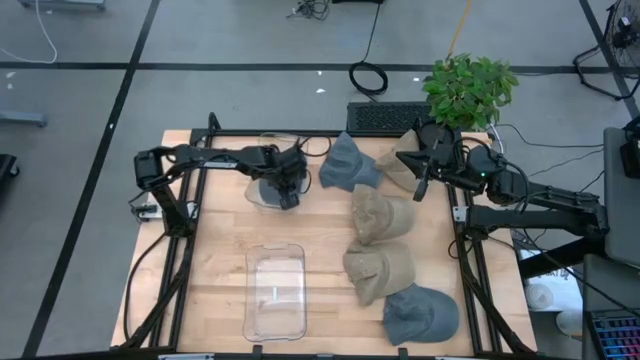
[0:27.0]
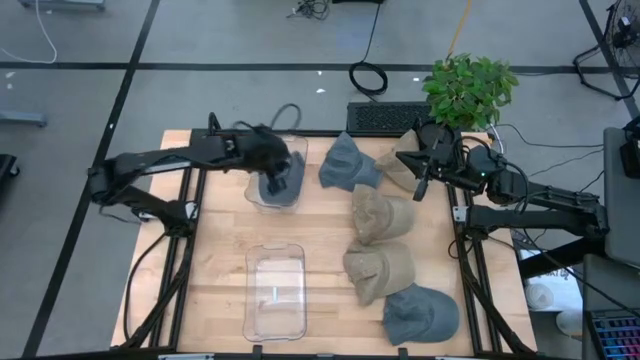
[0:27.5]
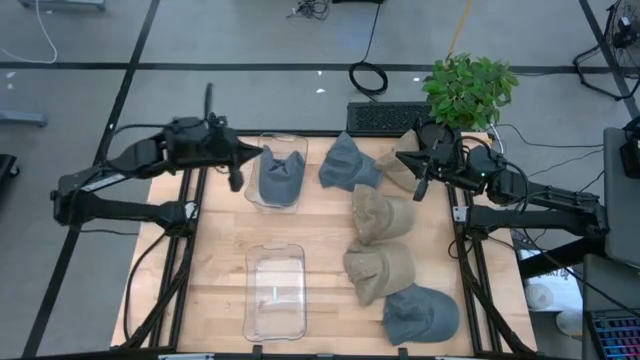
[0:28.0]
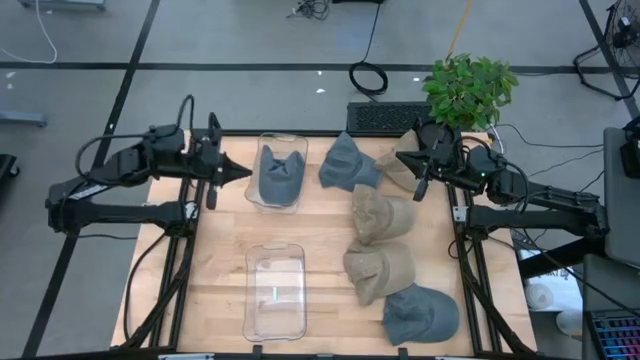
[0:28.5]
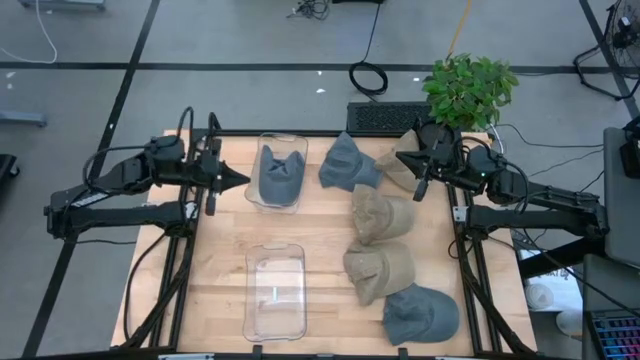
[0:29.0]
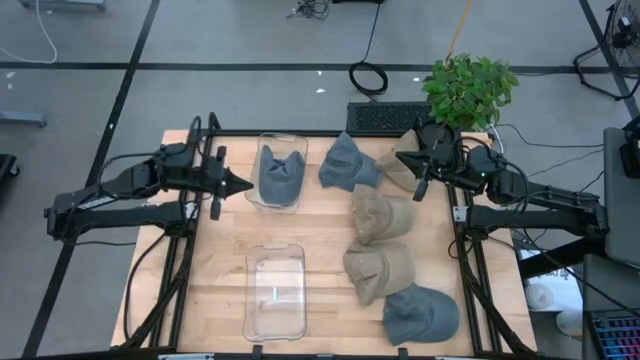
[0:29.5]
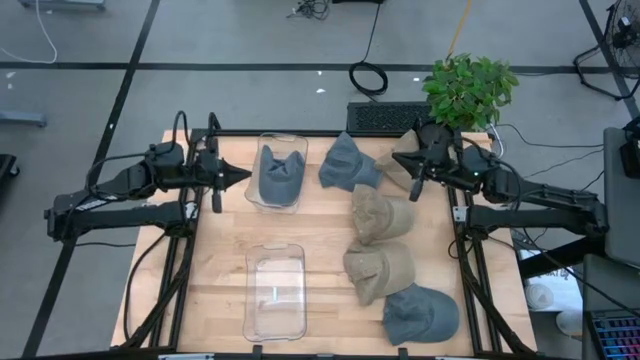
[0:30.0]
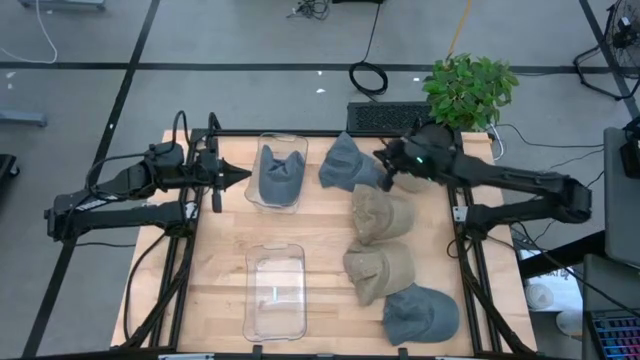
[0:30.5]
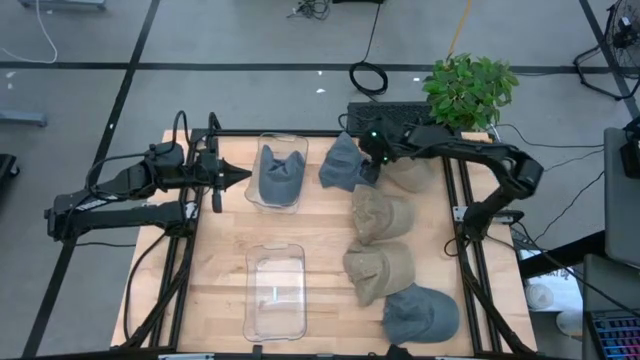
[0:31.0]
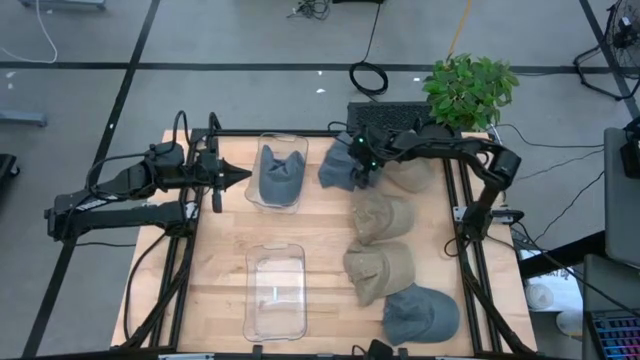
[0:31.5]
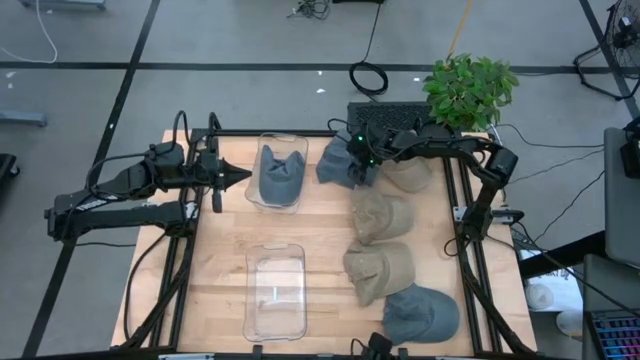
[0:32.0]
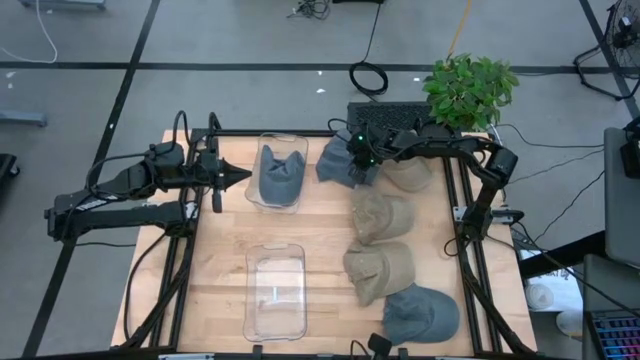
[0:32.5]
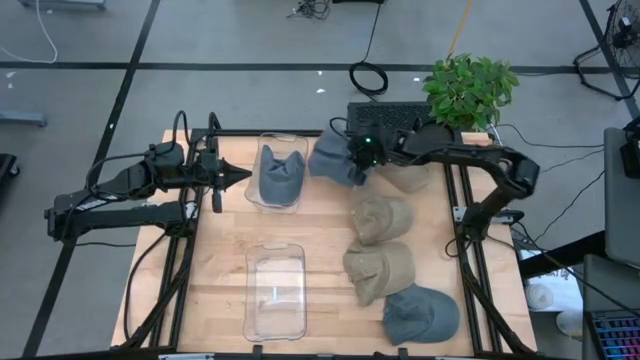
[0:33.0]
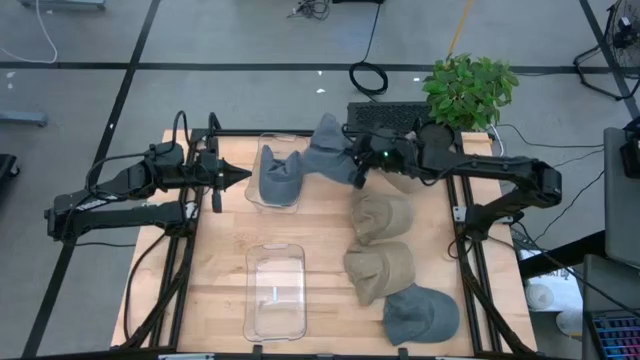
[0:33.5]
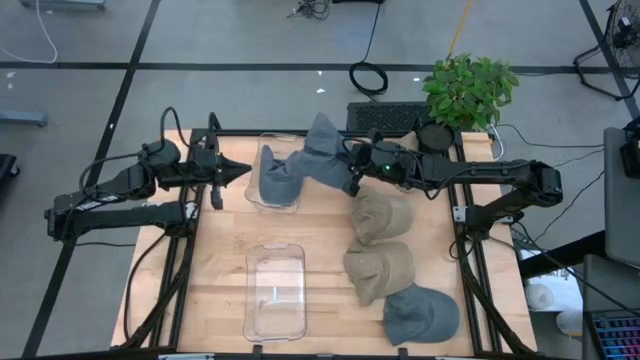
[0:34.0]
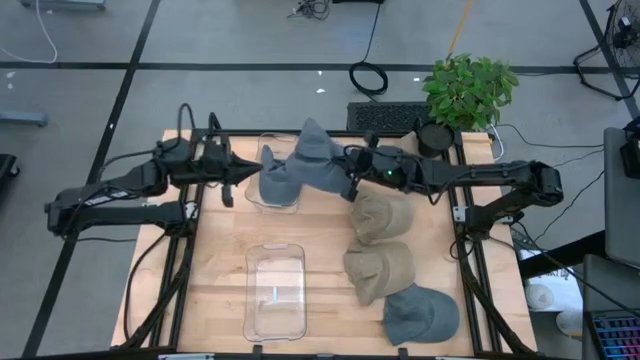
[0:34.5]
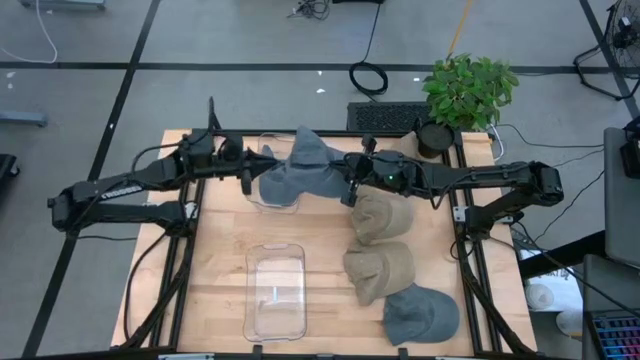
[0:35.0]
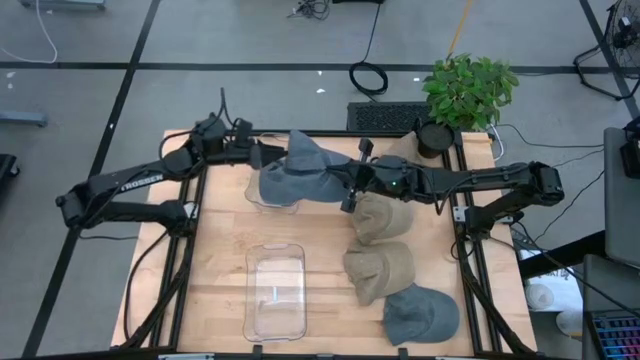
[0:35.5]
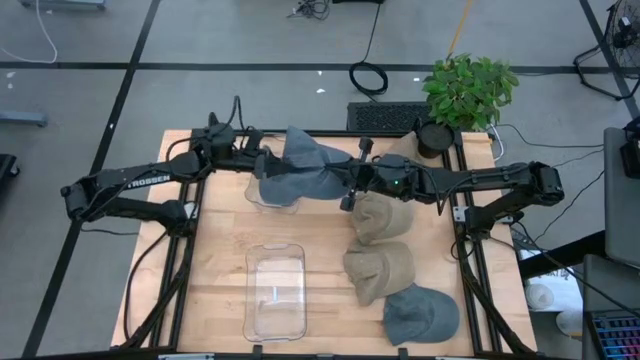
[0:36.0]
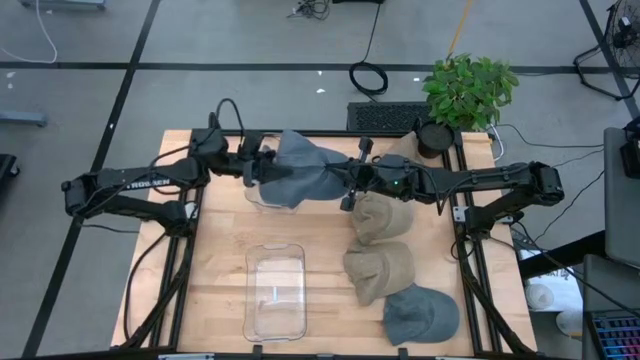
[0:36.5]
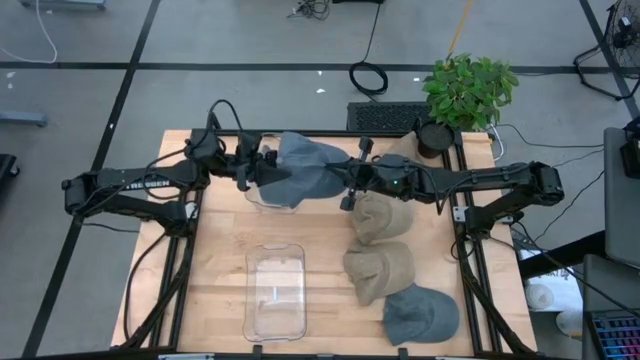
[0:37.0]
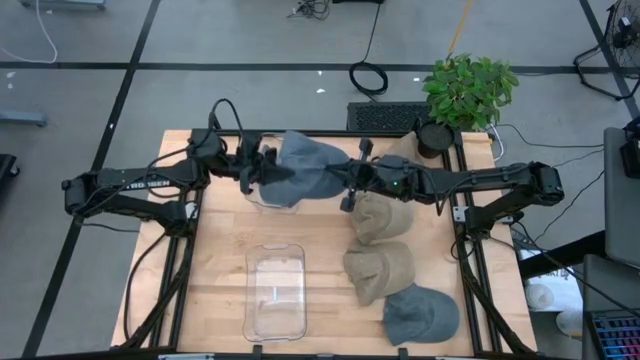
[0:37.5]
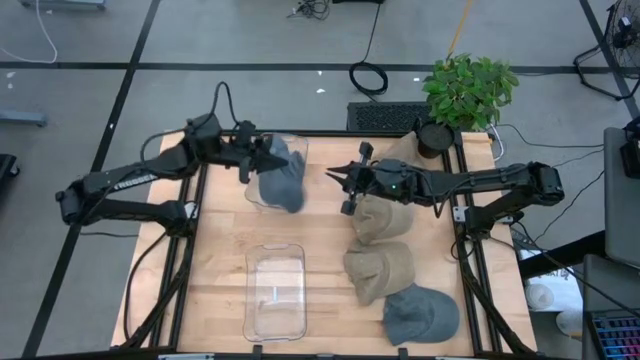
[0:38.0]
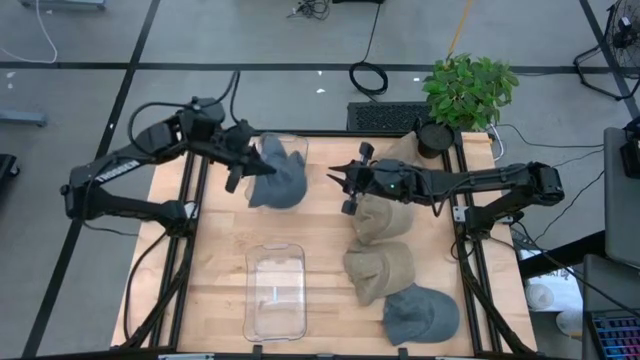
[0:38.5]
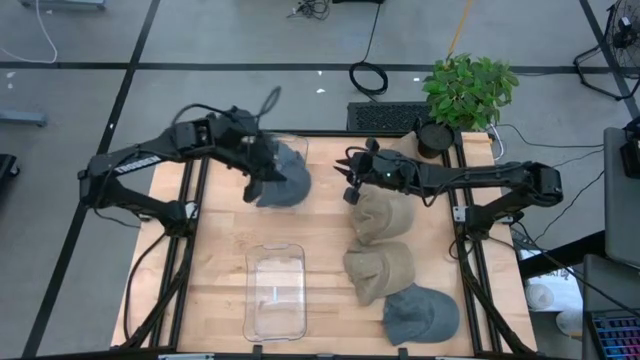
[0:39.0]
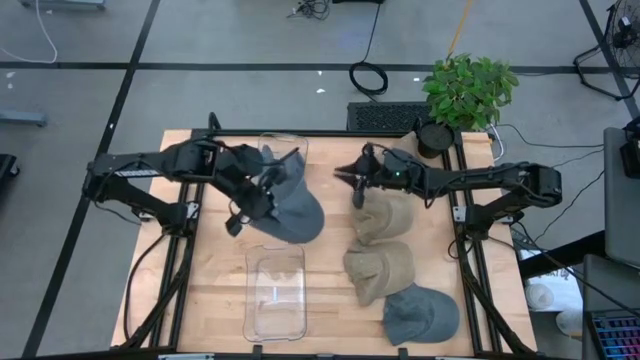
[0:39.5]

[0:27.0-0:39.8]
Task: Stack caps by color
Stack the top blue cap on the blue cap in the top transparent bin

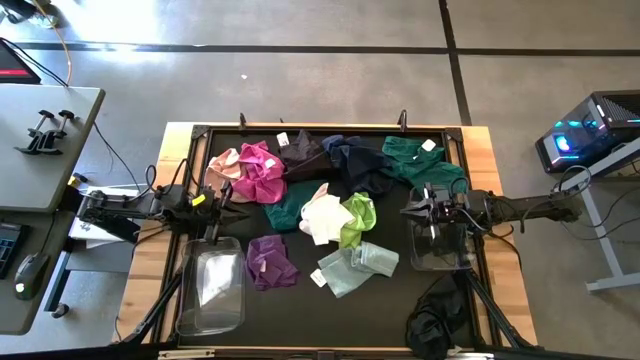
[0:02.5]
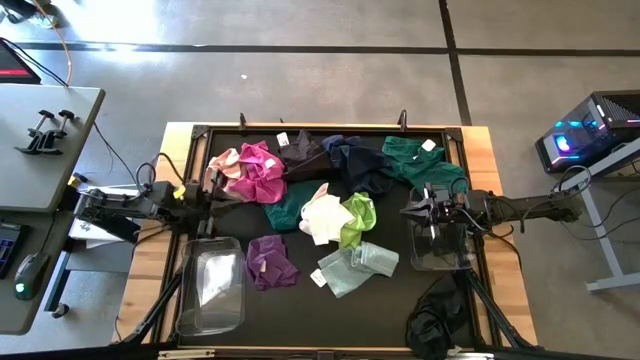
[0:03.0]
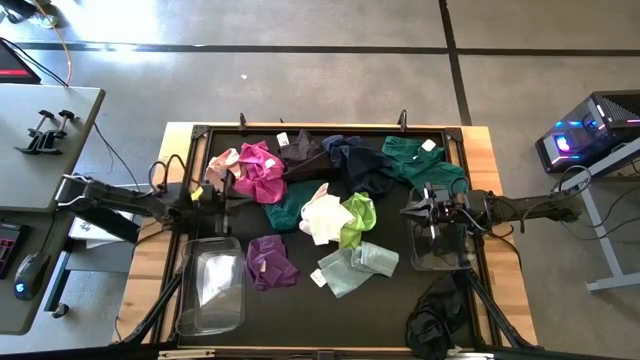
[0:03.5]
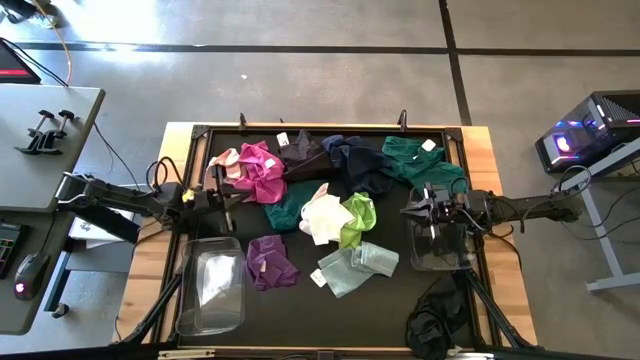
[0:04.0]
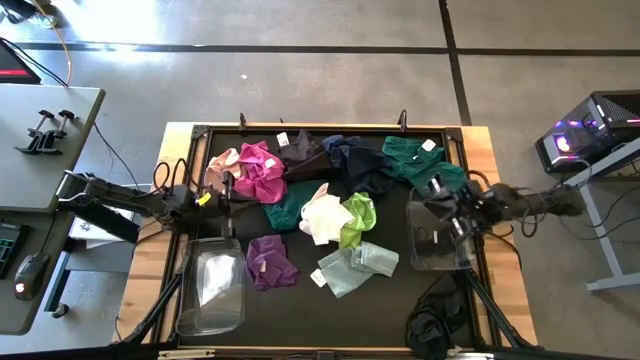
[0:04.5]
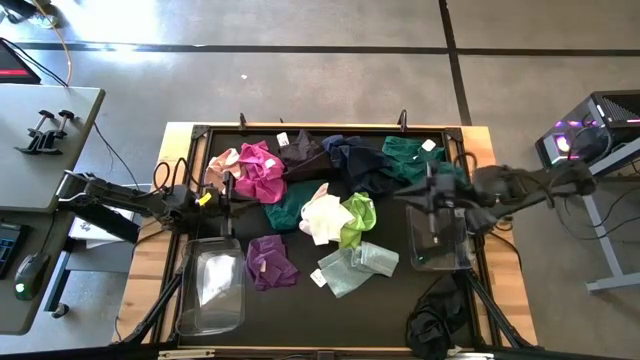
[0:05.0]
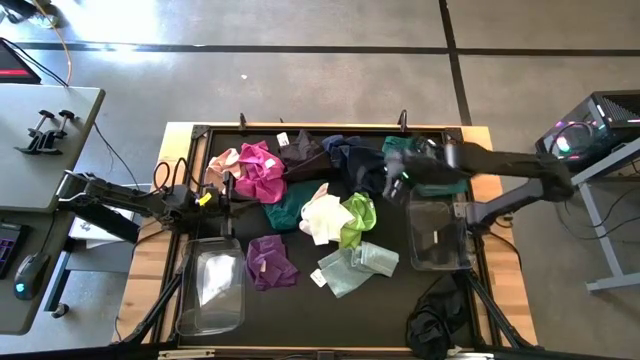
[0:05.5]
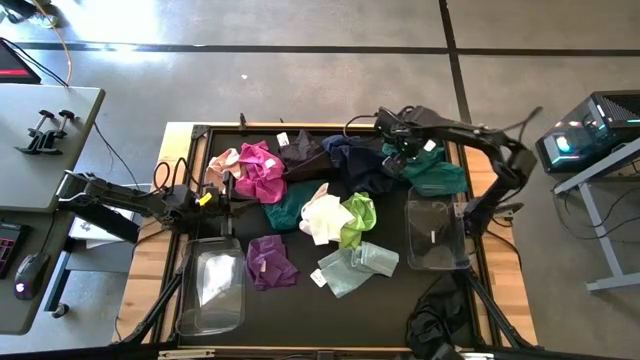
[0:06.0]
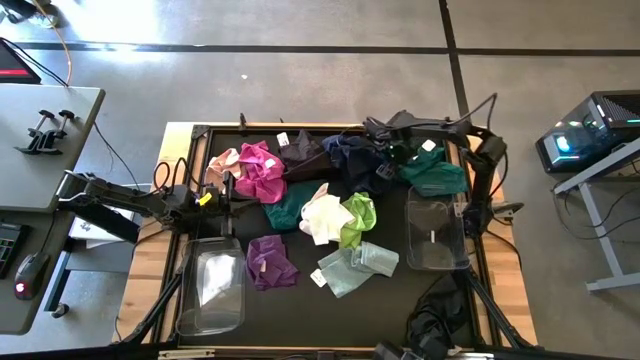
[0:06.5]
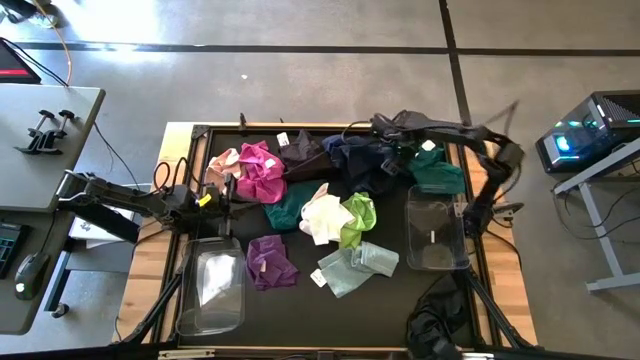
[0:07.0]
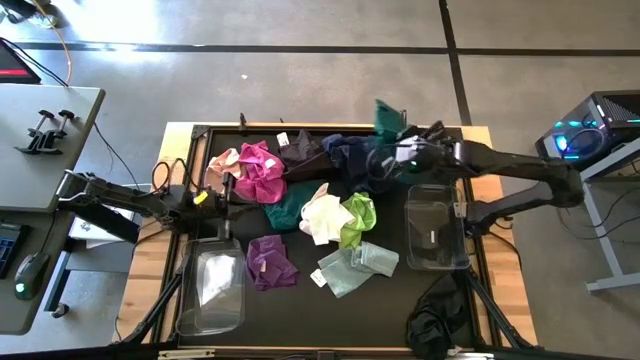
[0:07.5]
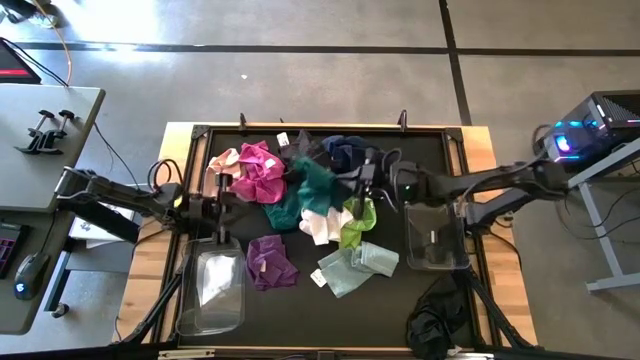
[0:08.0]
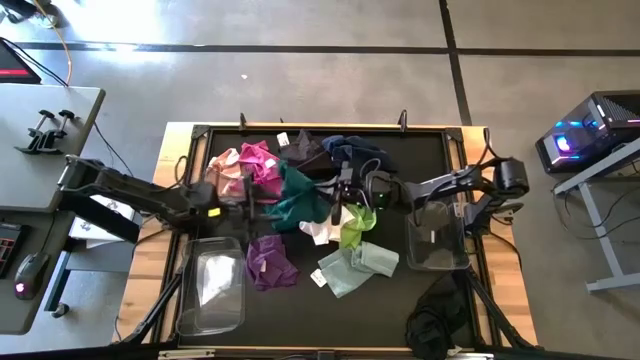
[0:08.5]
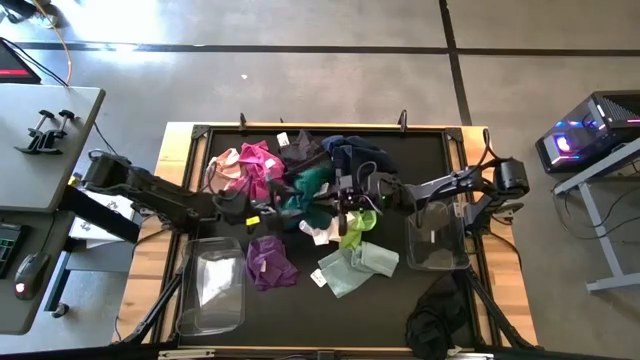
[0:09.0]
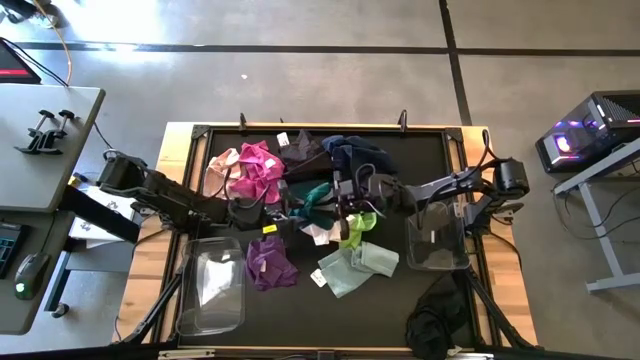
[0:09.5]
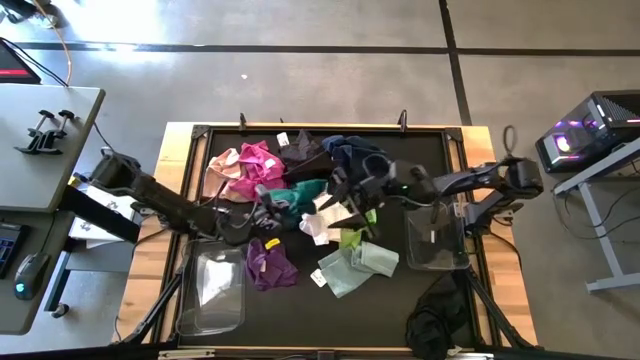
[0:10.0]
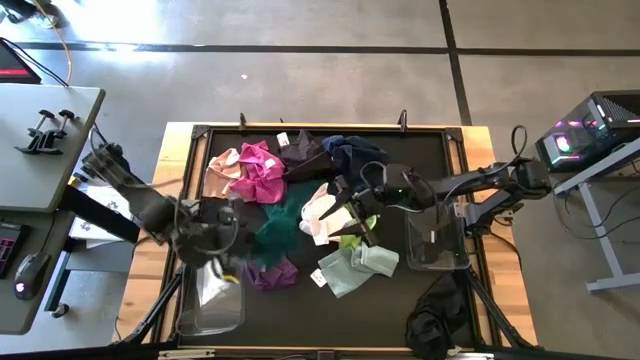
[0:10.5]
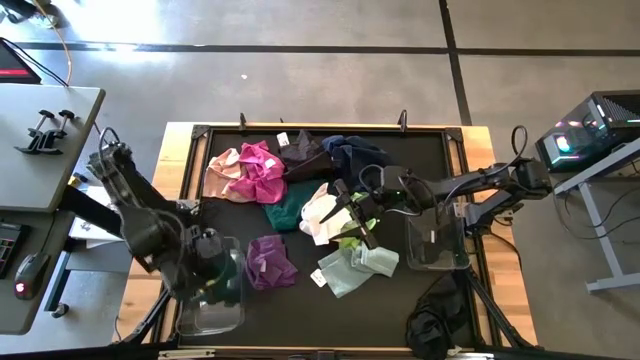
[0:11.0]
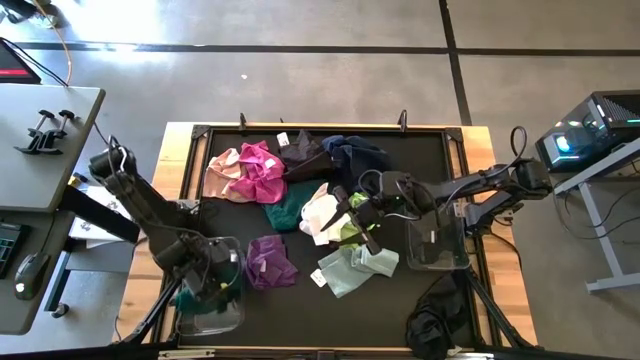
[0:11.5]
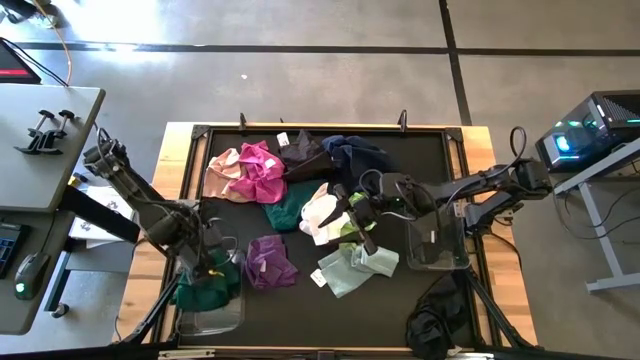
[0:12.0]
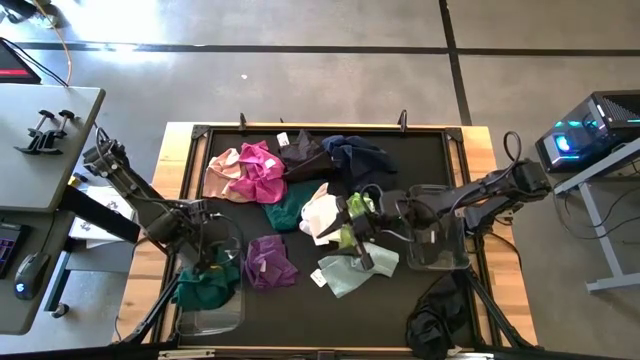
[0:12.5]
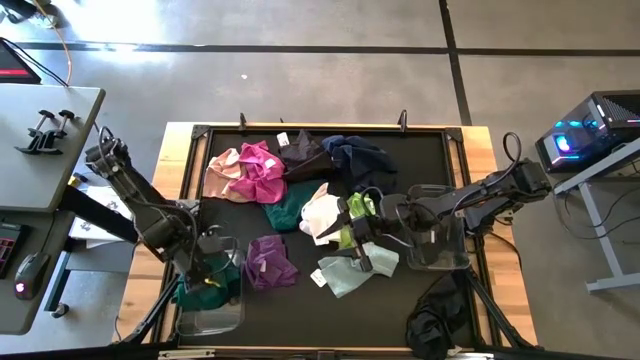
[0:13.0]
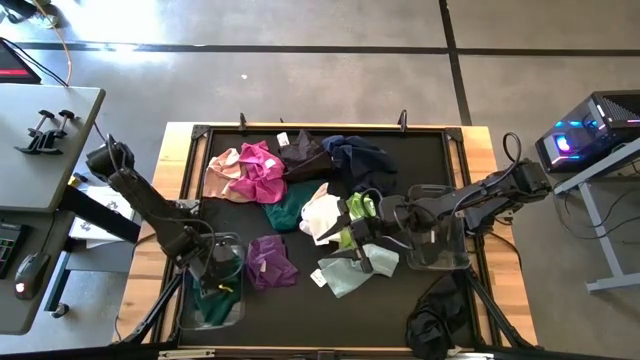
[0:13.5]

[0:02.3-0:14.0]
Task: Sort towels by color in basket
Put the right dark green towel into the left transparent bin
